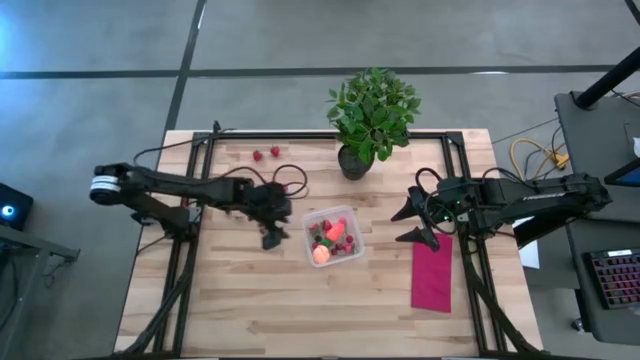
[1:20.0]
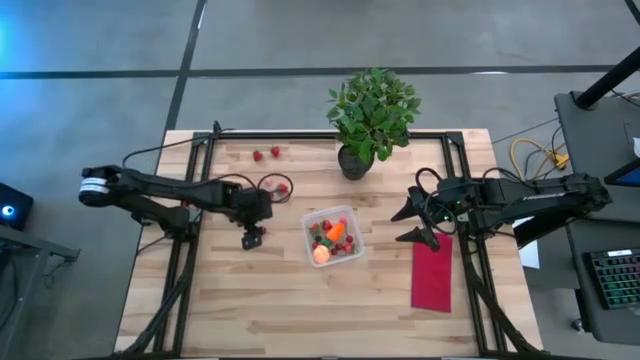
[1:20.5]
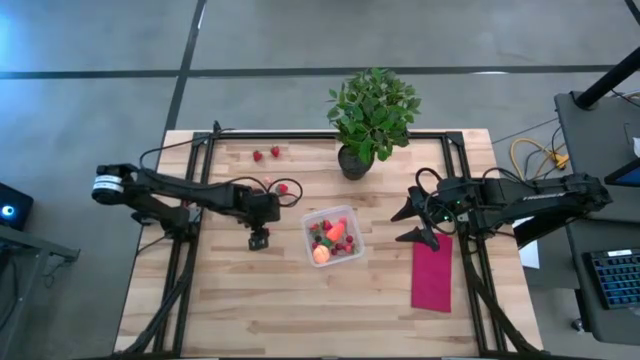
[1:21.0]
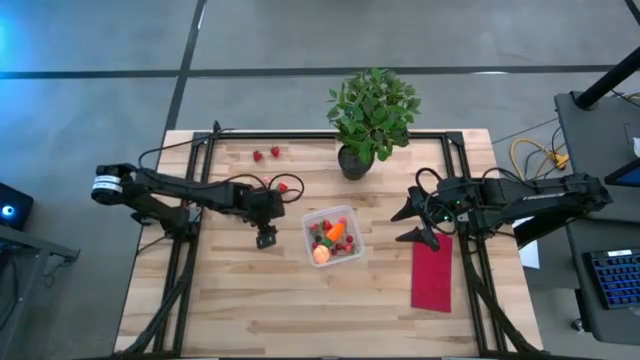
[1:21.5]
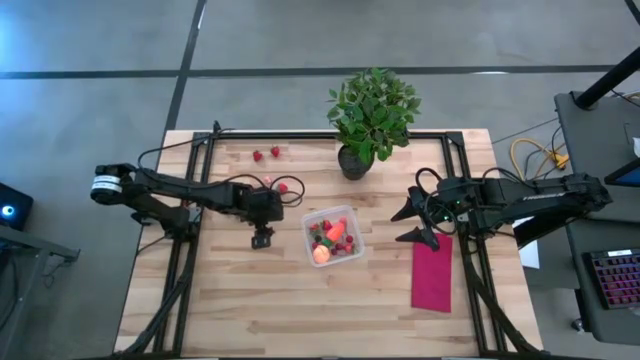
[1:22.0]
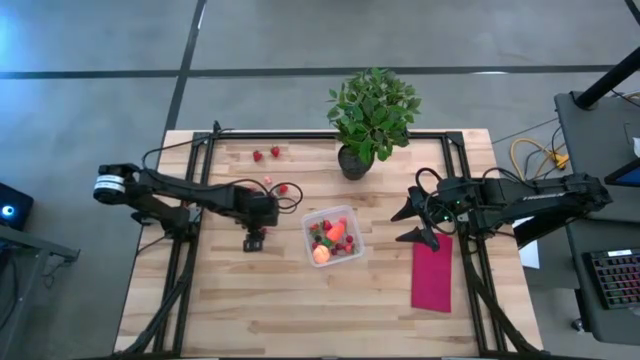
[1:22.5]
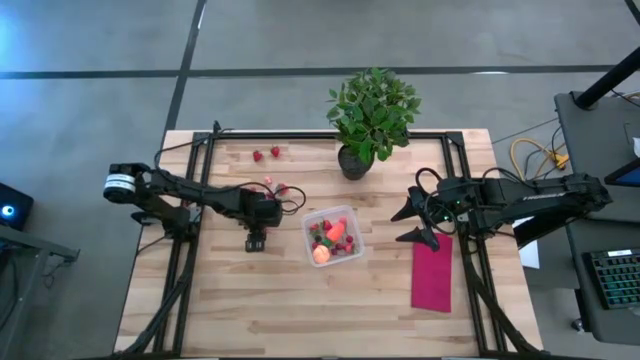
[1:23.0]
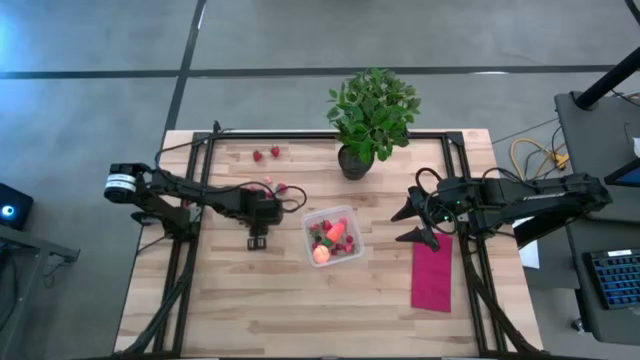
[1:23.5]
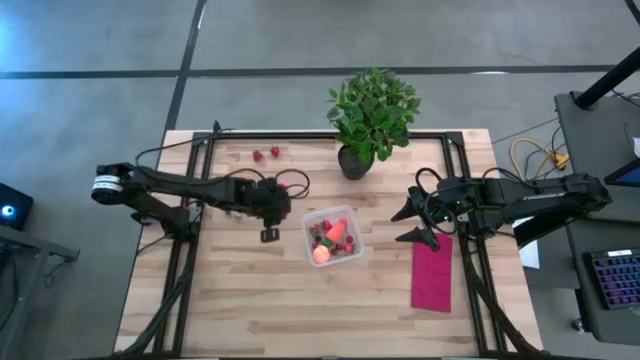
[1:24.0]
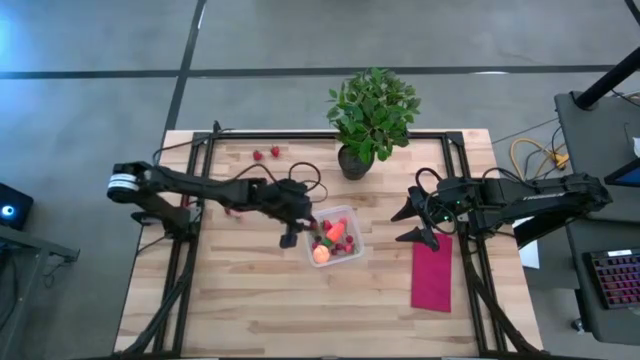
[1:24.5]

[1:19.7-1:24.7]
Task: Pick and placing Produce into tupperware
Put the red cherry into the transparent bin

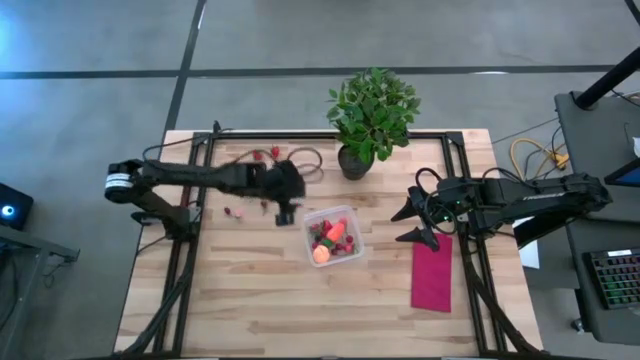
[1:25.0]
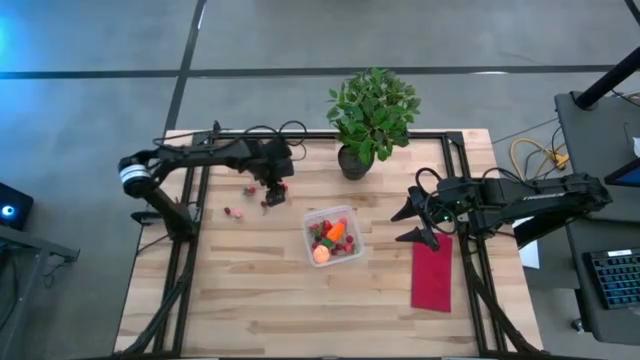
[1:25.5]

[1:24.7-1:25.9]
Put the red strawberry into the transparent bin

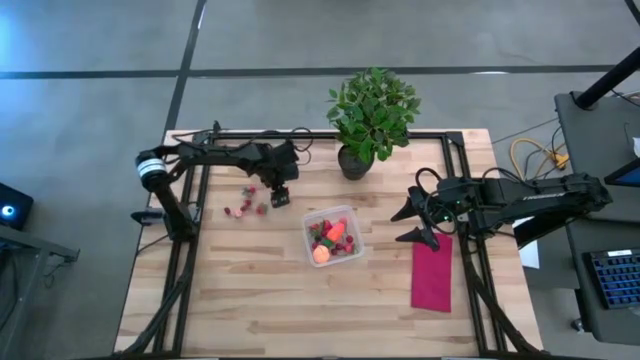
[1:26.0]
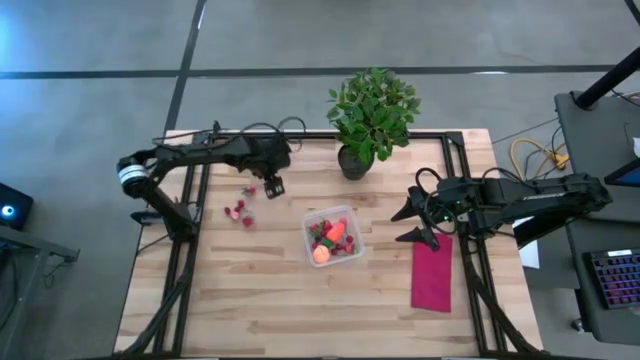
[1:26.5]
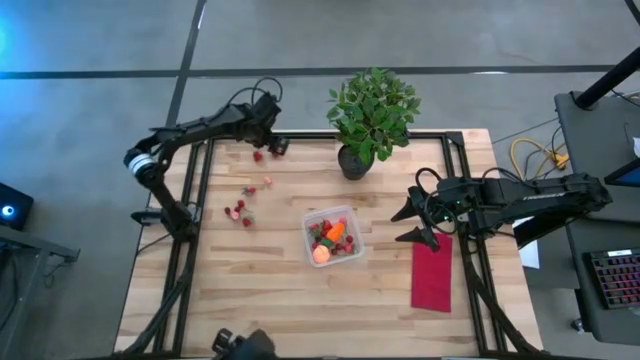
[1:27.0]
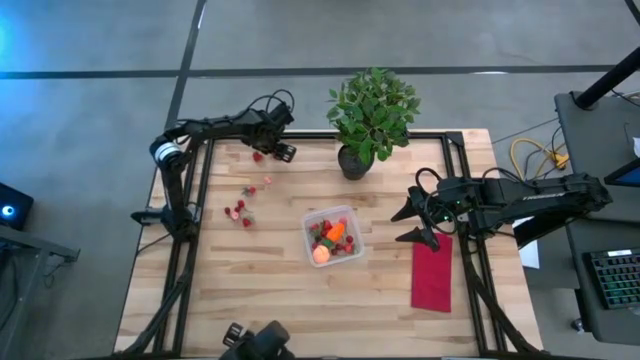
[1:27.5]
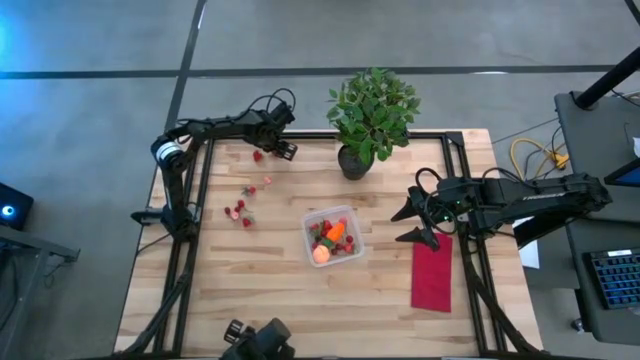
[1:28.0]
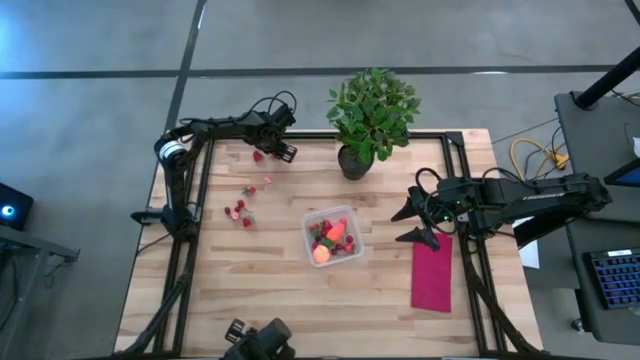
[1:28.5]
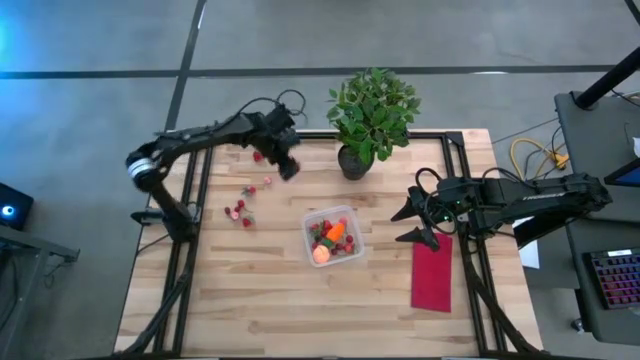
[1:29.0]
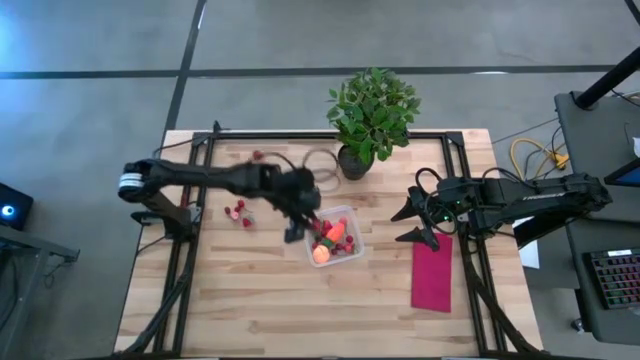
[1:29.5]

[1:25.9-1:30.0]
Put the red strawberry into the transparent bin

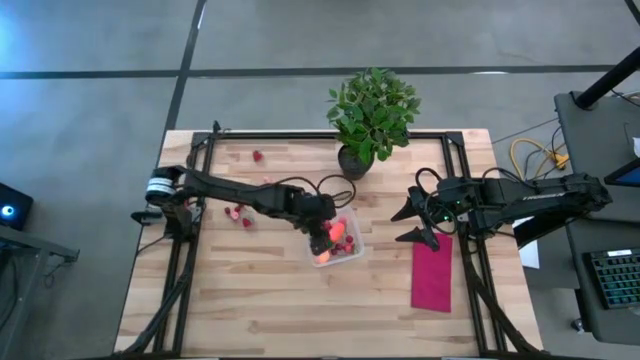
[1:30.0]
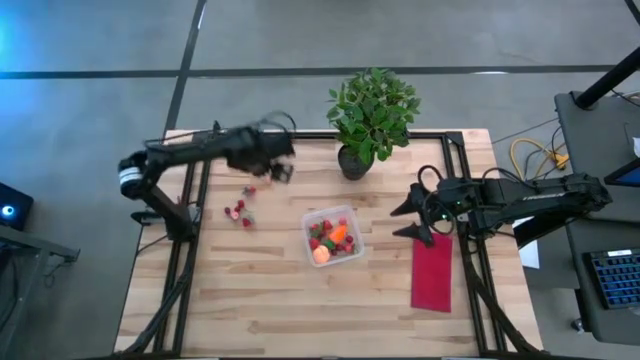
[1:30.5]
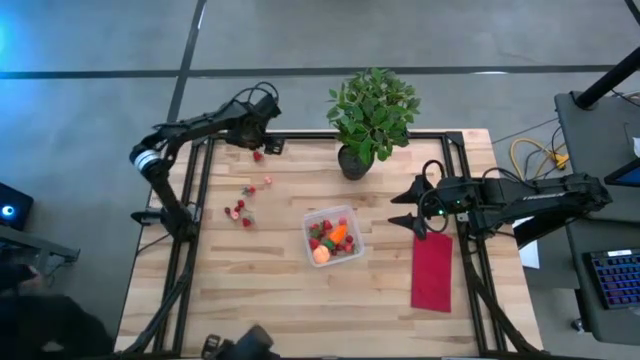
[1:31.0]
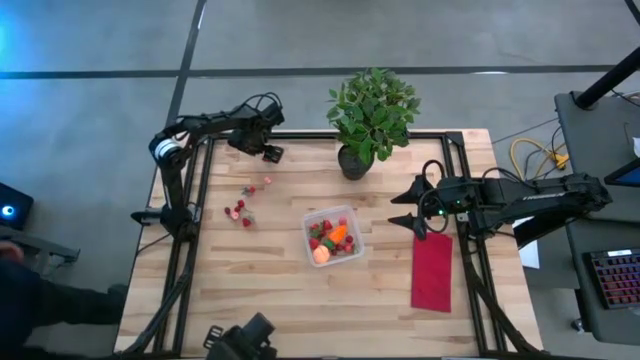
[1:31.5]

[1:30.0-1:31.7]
Put the red strawberry into the transparent bin

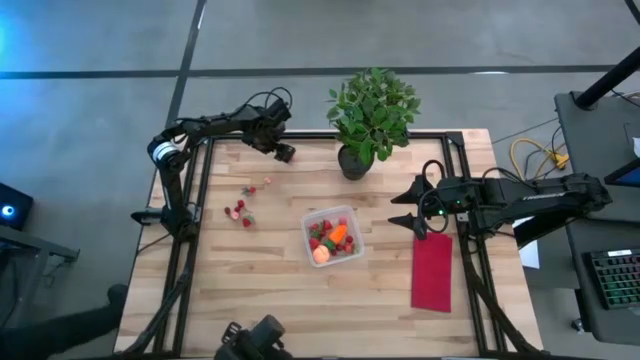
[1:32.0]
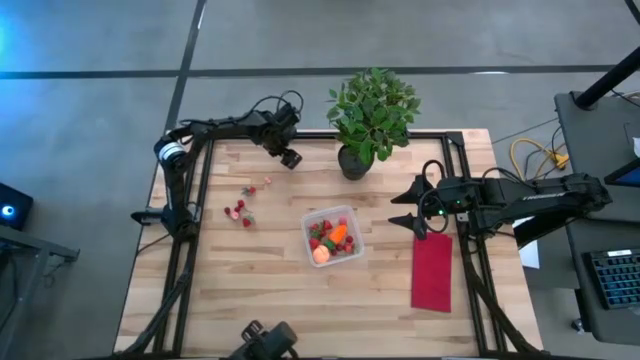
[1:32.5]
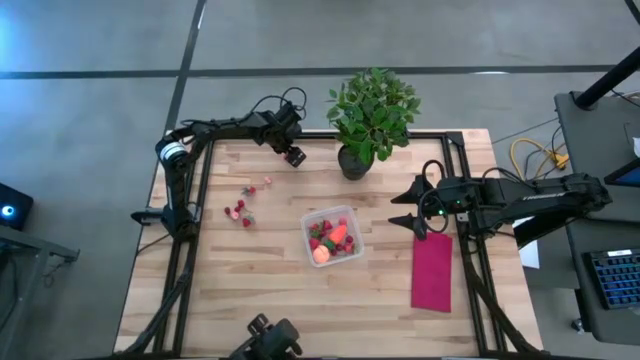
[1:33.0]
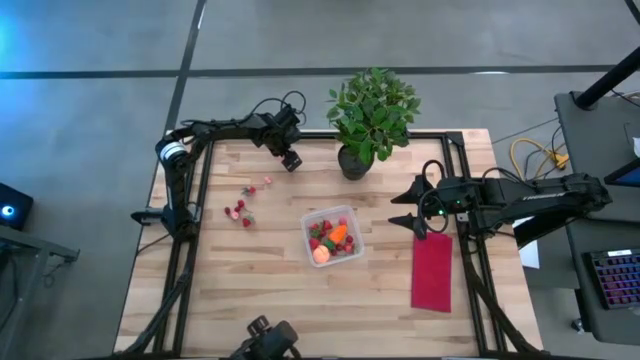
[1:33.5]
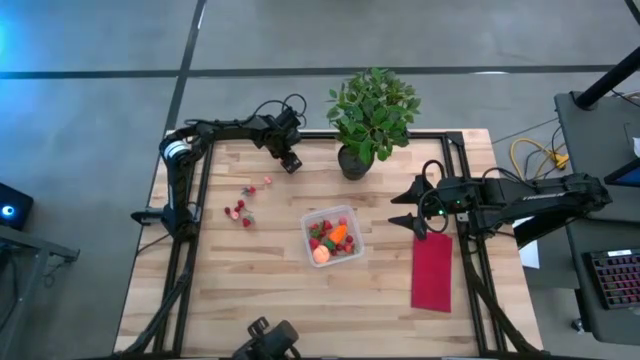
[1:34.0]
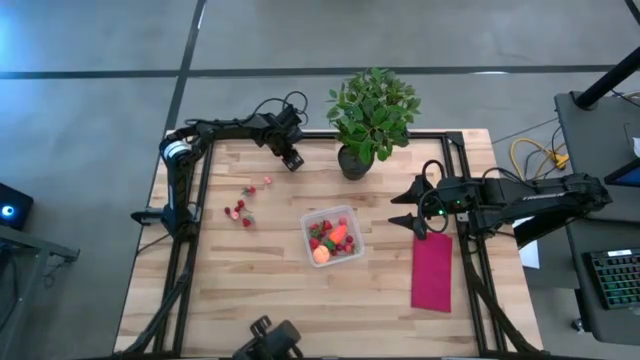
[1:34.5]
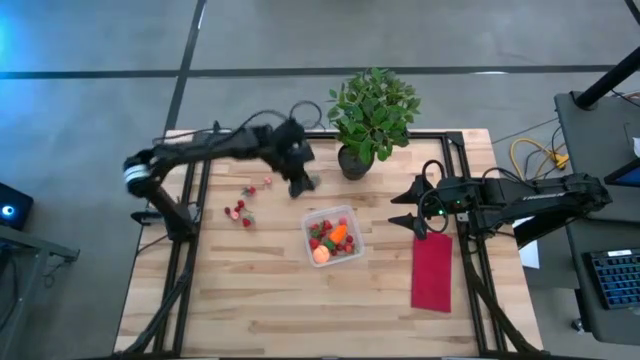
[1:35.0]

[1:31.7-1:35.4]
Put the red strawberry into the transparent bin

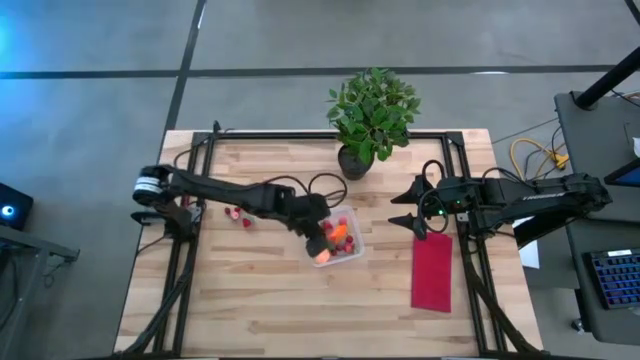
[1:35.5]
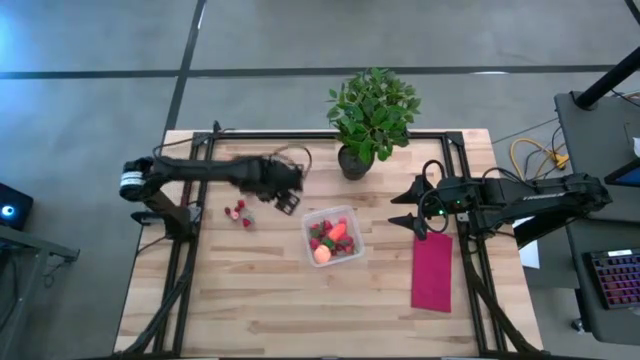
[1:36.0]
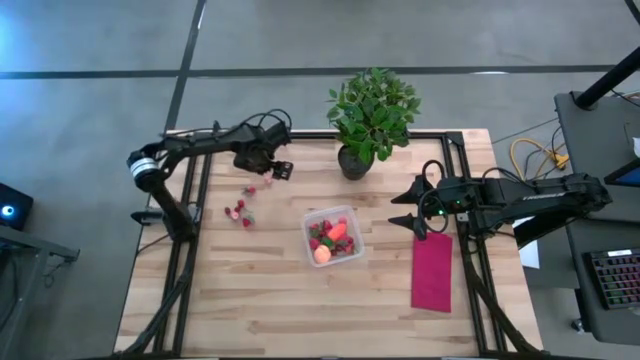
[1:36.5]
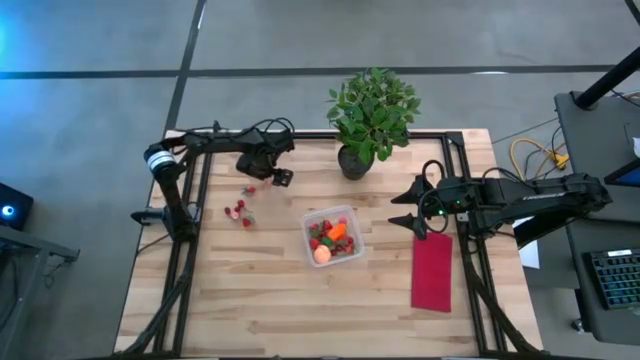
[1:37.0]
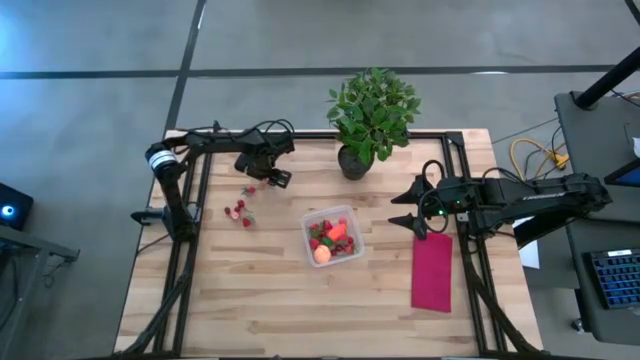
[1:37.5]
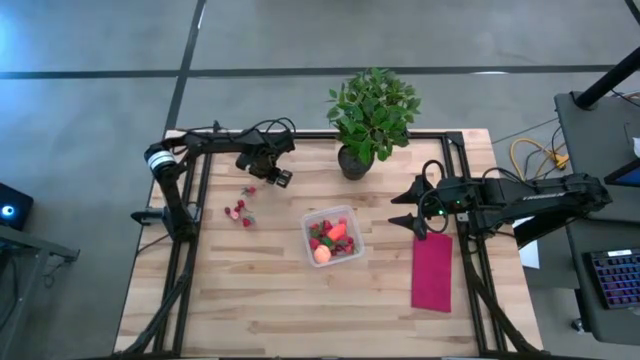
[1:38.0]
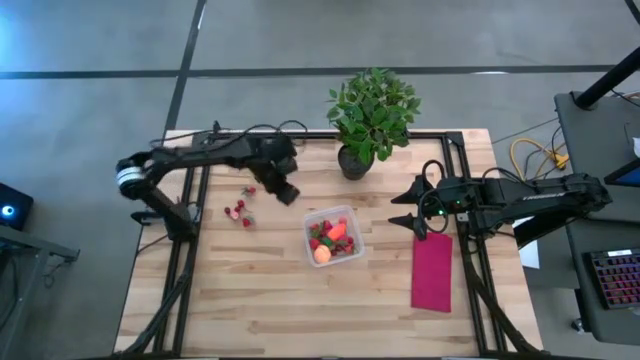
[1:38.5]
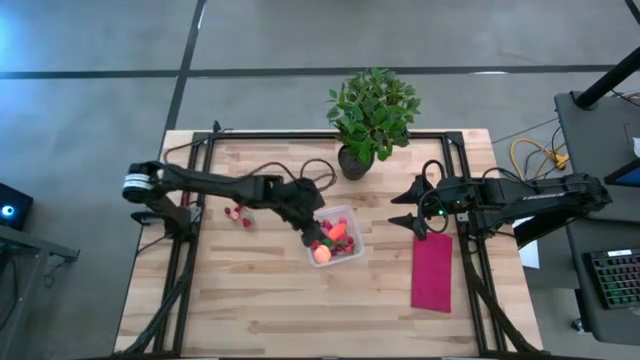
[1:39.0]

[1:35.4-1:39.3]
Put the pink peach into the transparent bin

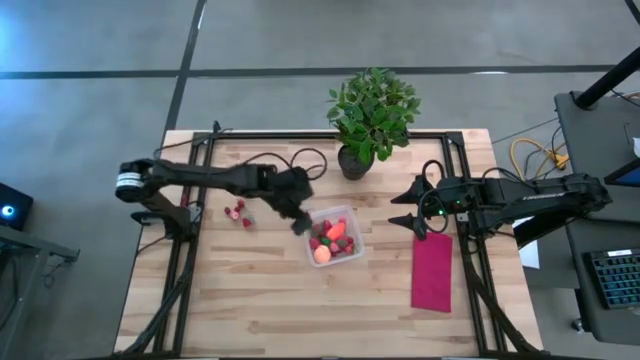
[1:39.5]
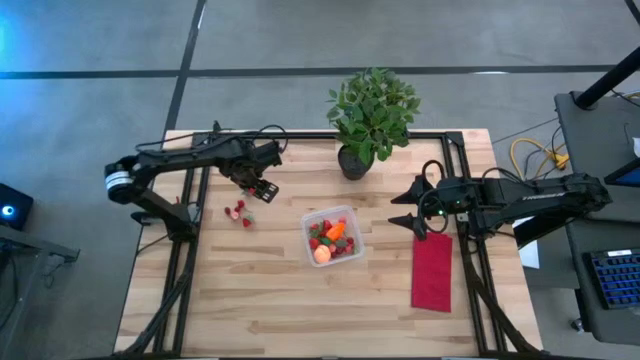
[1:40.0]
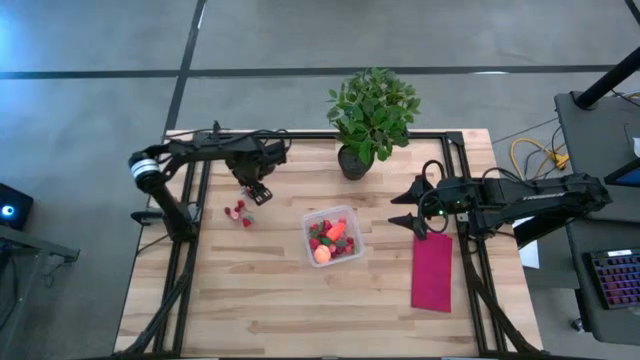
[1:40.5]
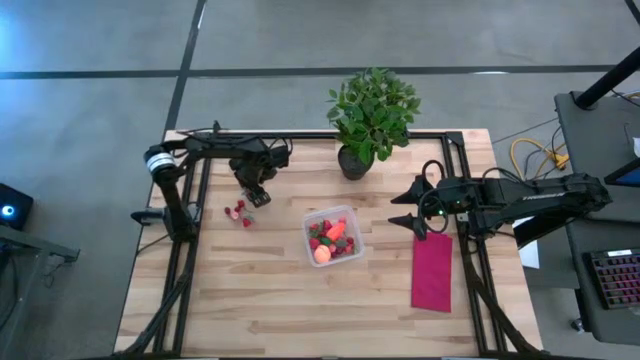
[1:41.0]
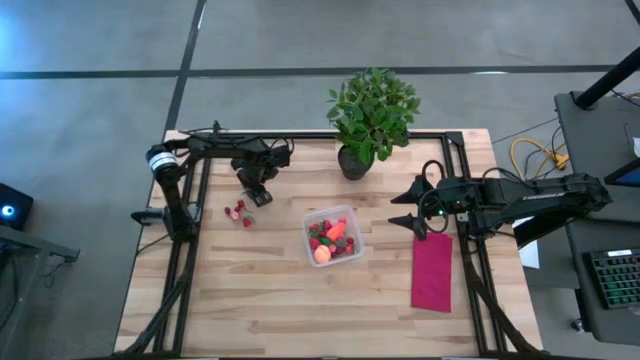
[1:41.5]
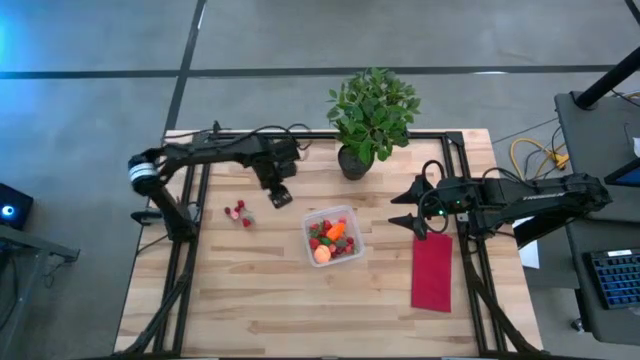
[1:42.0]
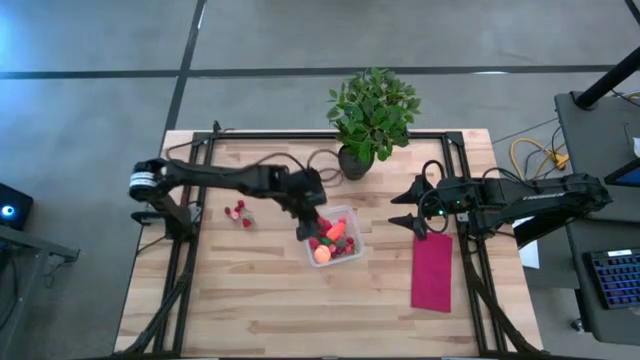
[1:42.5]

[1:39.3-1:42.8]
Put the red strawberry into the transparent bin
